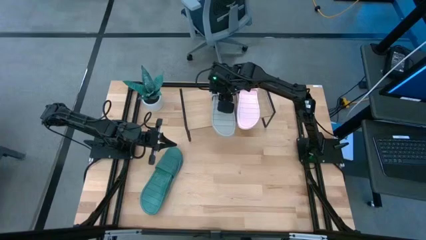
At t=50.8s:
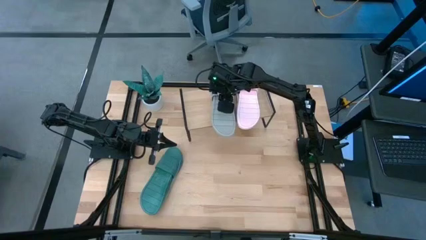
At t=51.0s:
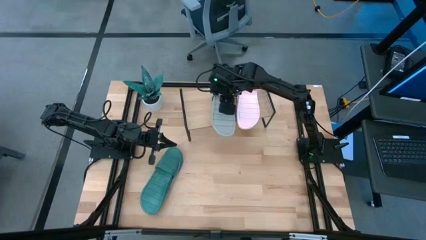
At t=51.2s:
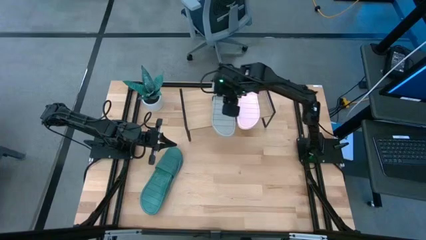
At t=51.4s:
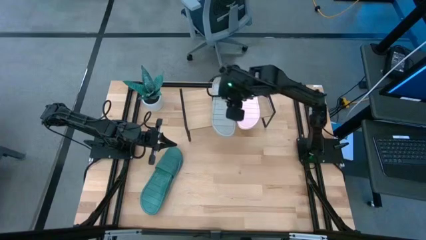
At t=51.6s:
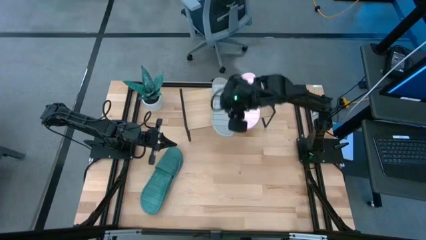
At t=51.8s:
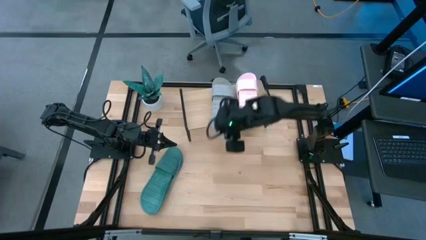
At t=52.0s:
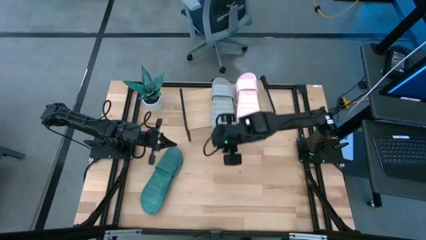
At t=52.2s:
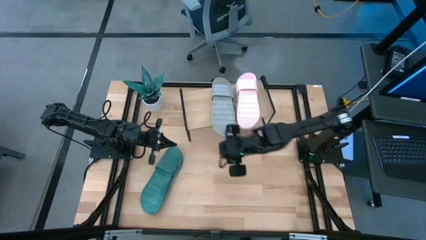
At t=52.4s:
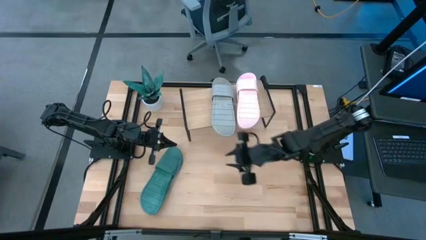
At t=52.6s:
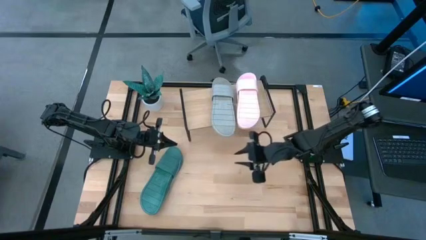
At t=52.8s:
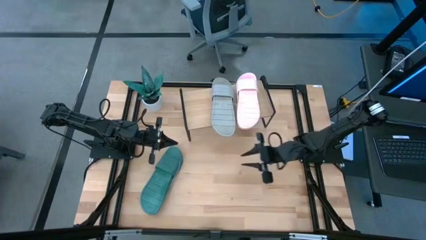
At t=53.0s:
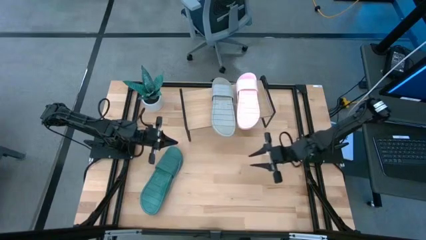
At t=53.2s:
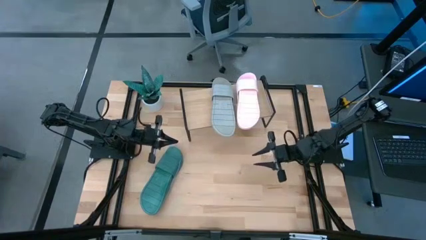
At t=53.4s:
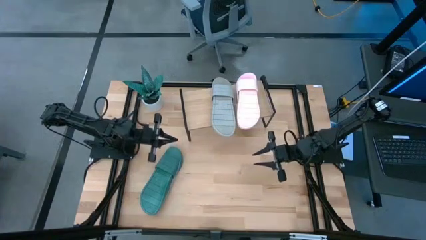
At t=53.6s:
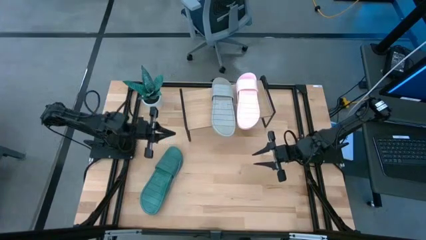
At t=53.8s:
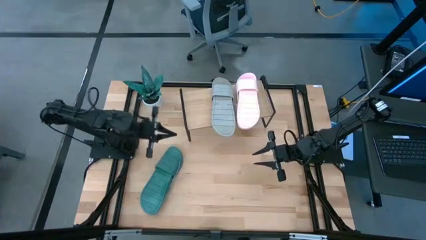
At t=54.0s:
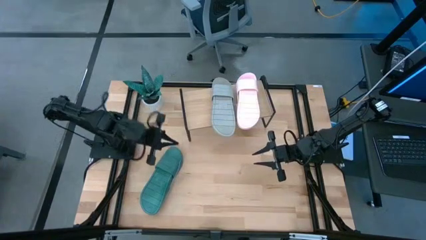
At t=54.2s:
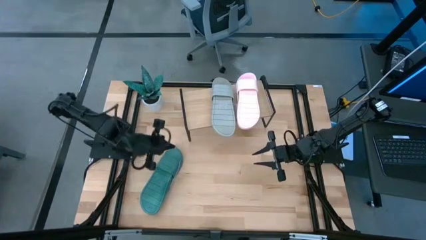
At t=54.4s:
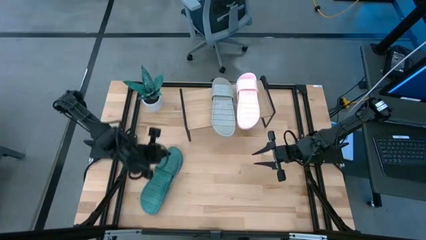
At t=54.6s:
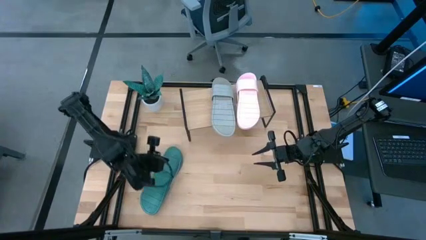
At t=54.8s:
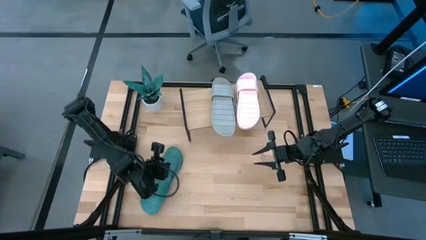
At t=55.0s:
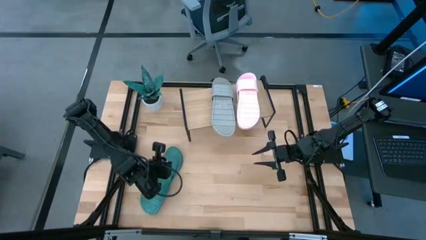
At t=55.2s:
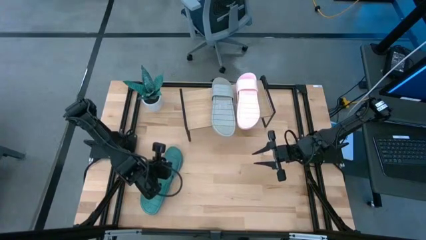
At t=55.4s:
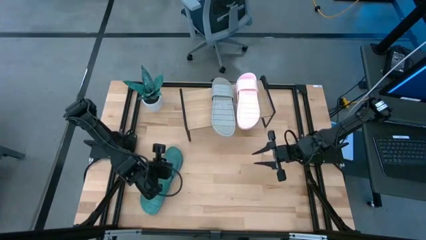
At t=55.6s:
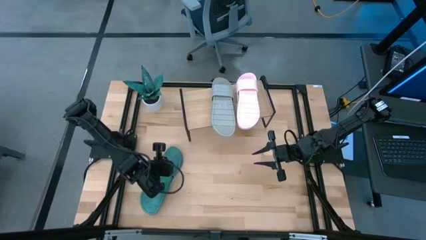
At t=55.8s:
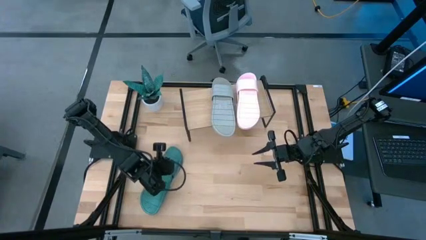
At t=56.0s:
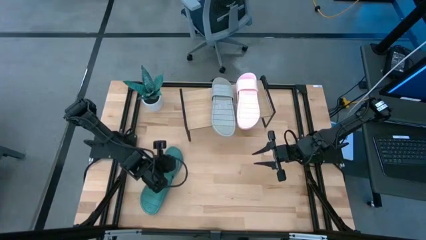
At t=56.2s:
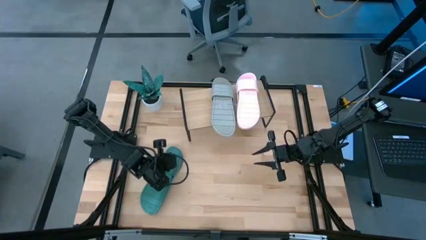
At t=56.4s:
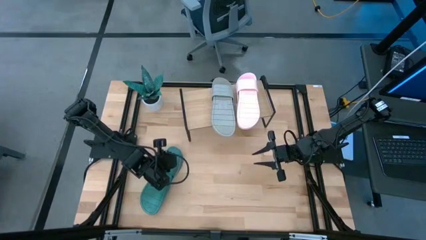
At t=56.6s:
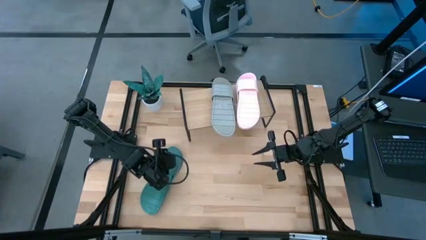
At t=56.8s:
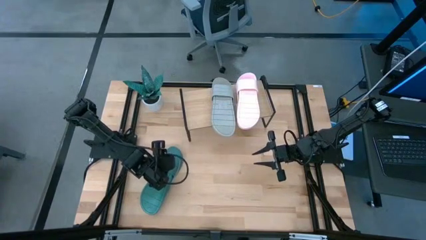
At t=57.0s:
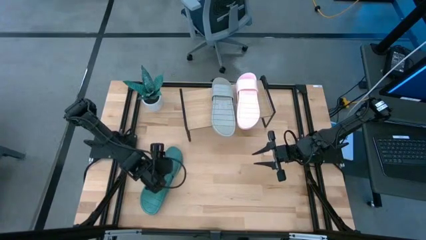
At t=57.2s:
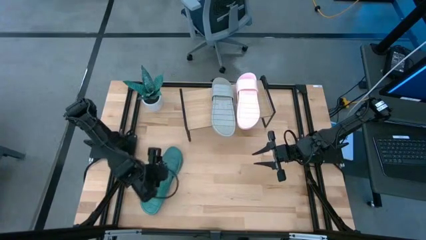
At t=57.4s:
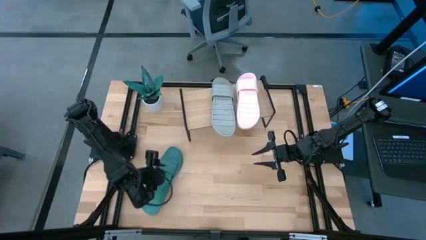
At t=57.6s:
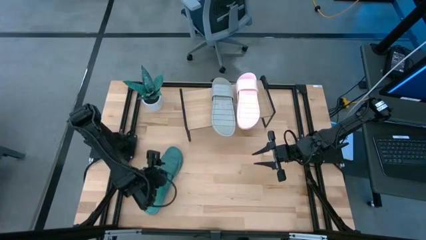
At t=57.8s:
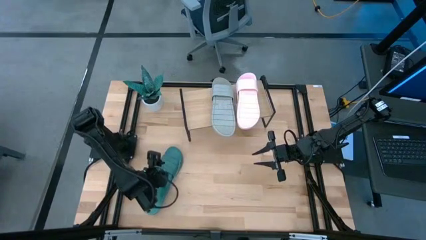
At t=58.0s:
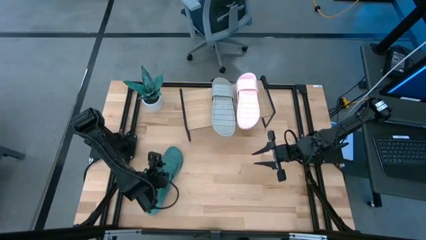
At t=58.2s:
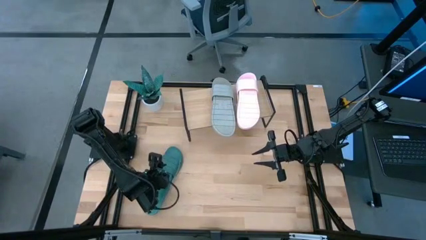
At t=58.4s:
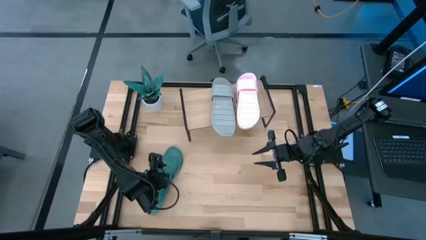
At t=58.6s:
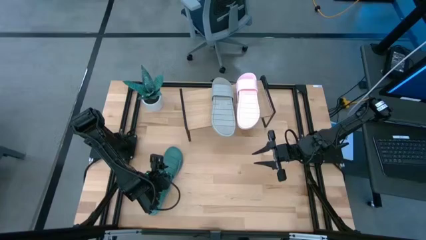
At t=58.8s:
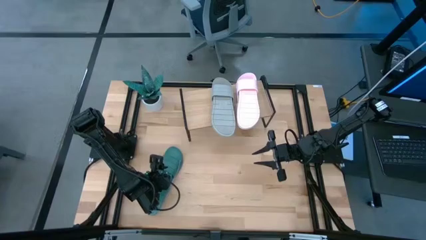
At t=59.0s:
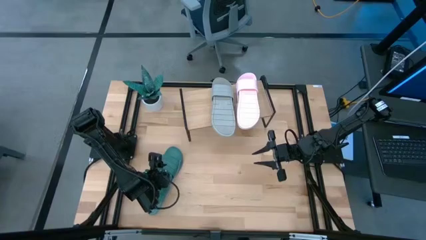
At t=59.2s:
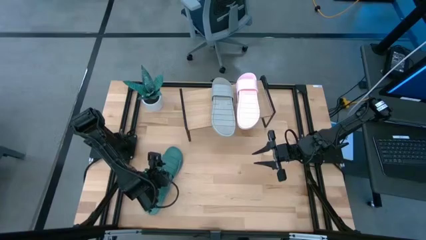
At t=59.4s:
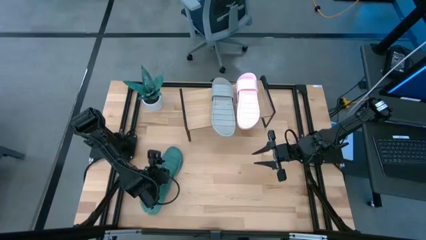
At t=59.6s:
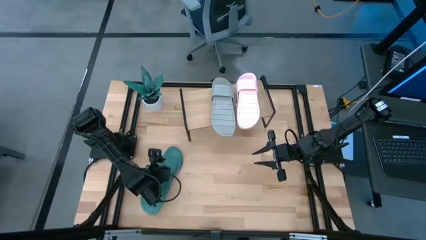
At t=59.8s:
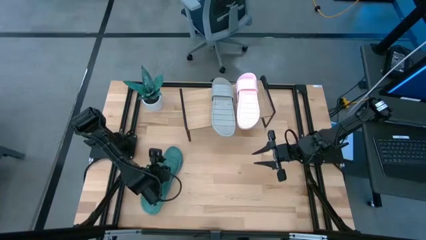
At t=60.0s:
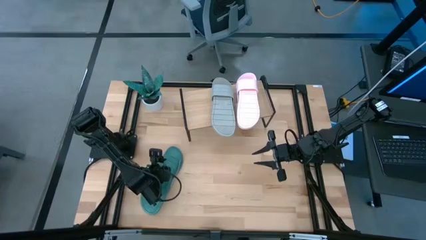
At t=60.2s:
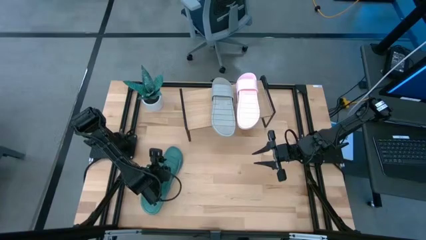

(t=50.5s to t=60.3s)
Task: Pick and place slides into the shelf
Put the green pair of slides on the shelf

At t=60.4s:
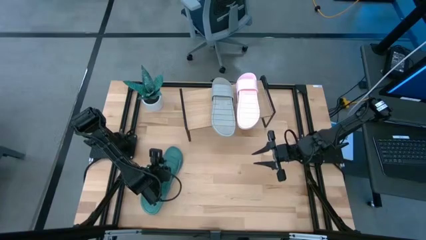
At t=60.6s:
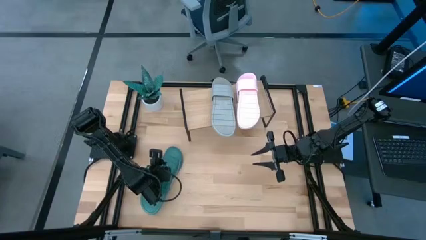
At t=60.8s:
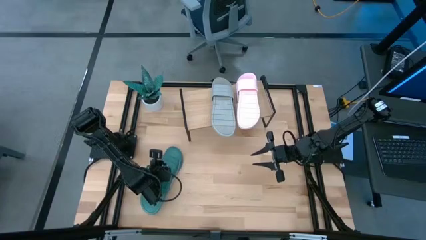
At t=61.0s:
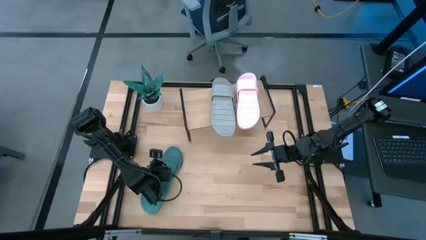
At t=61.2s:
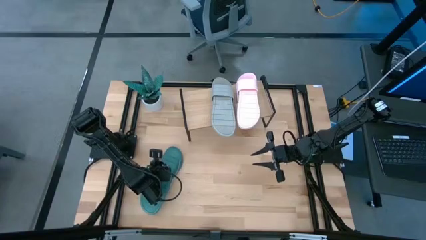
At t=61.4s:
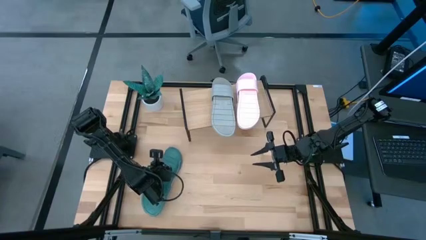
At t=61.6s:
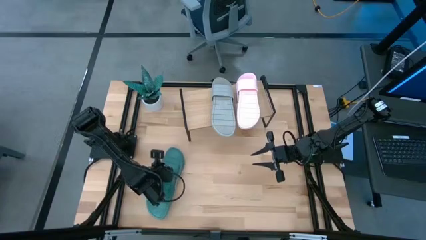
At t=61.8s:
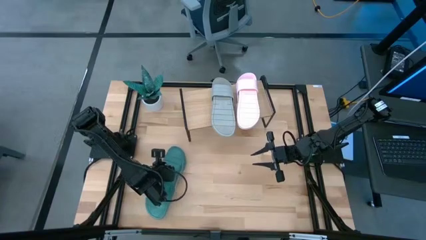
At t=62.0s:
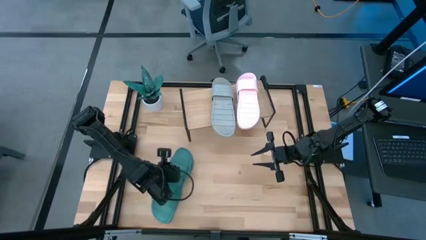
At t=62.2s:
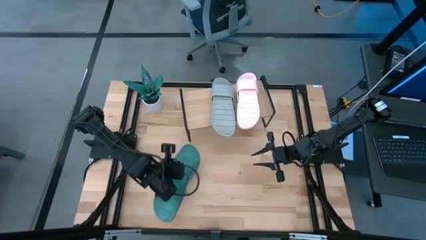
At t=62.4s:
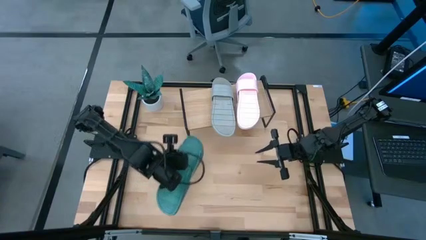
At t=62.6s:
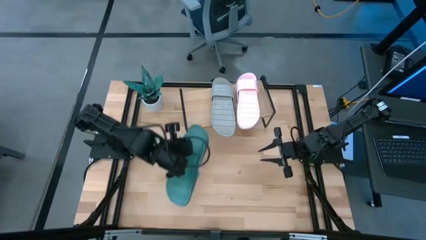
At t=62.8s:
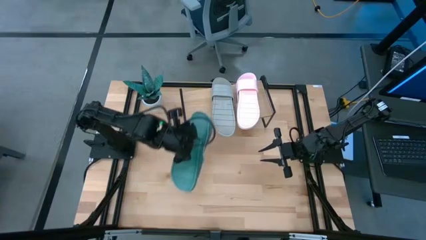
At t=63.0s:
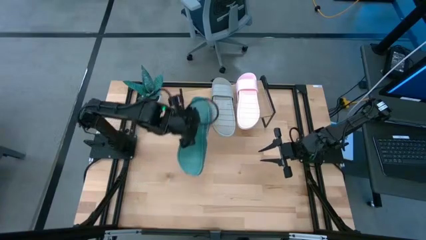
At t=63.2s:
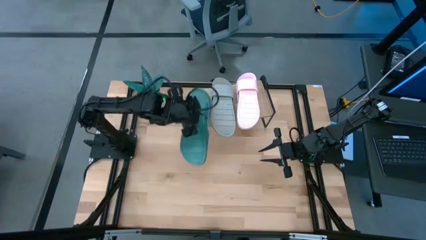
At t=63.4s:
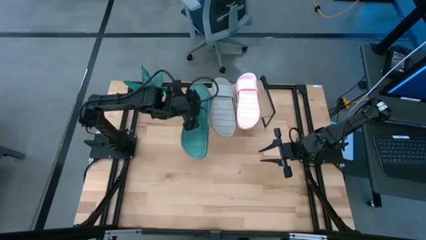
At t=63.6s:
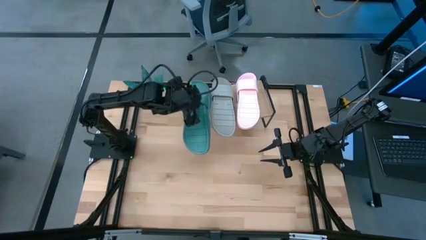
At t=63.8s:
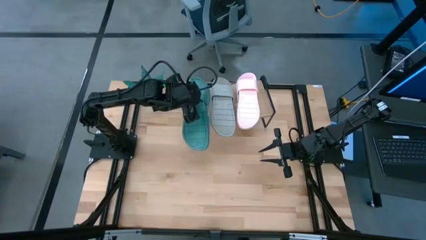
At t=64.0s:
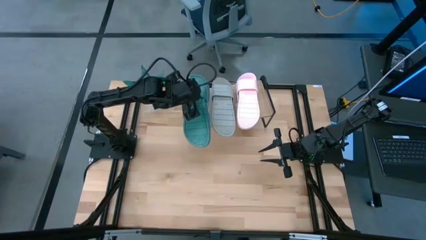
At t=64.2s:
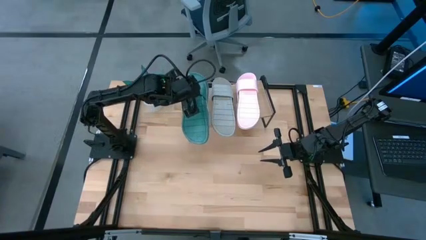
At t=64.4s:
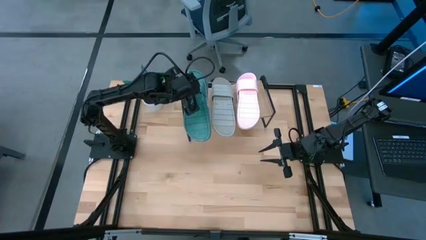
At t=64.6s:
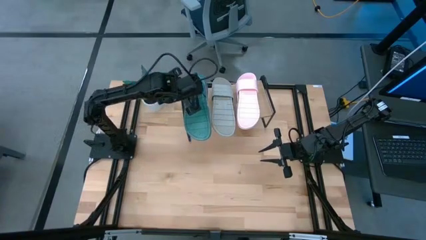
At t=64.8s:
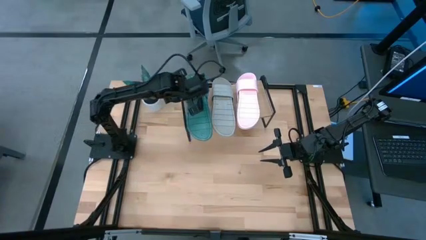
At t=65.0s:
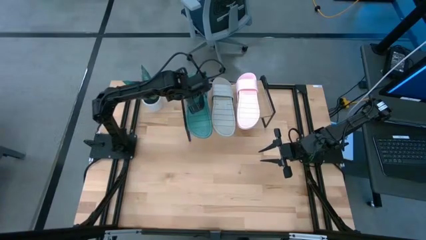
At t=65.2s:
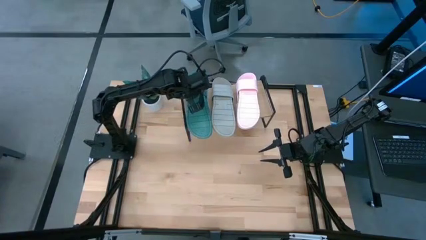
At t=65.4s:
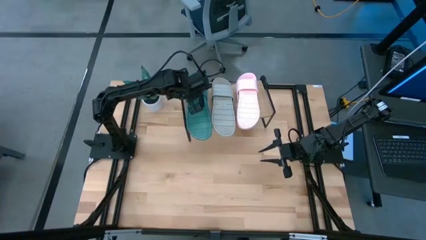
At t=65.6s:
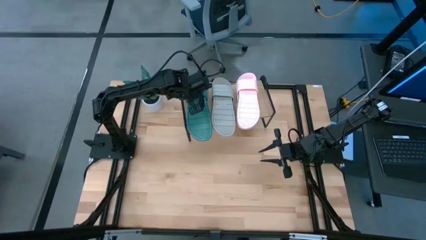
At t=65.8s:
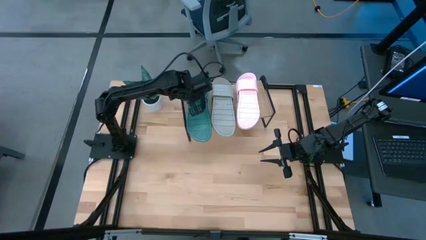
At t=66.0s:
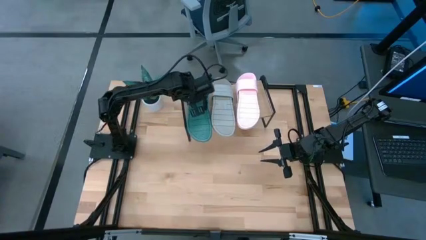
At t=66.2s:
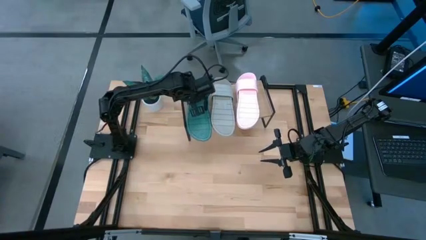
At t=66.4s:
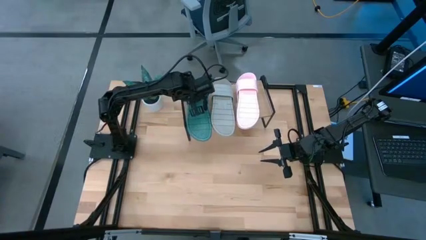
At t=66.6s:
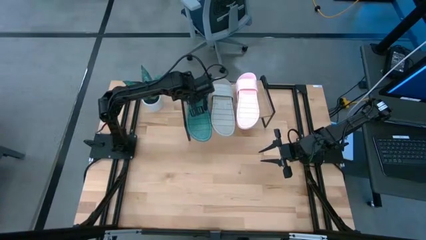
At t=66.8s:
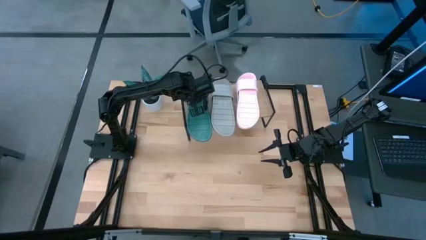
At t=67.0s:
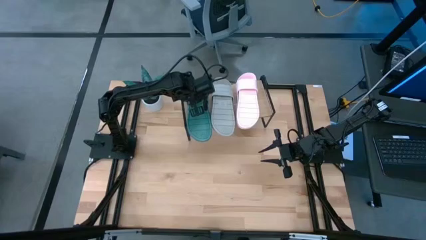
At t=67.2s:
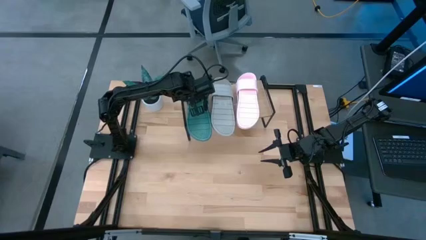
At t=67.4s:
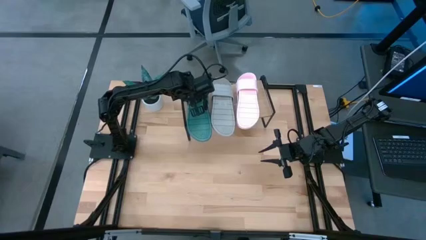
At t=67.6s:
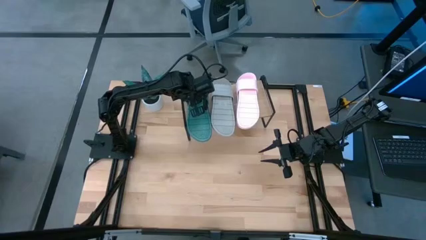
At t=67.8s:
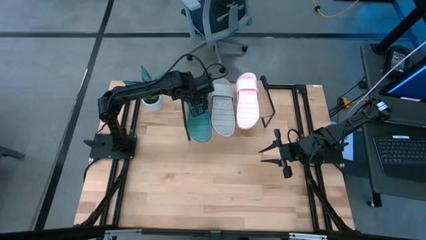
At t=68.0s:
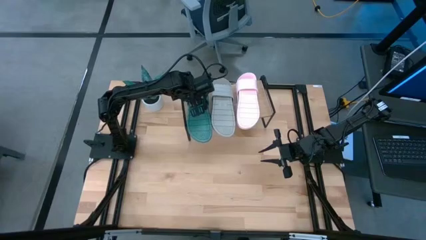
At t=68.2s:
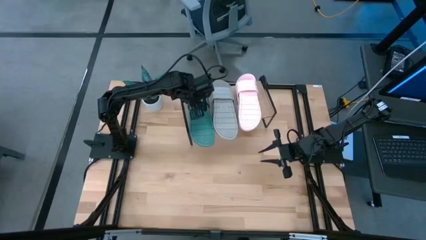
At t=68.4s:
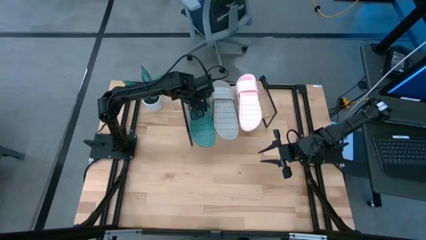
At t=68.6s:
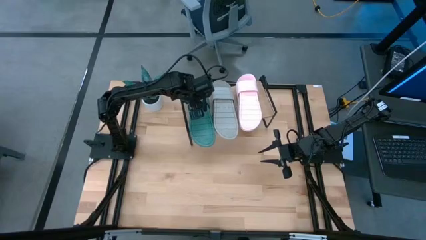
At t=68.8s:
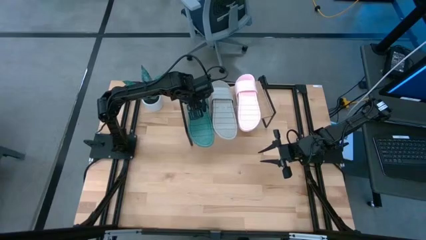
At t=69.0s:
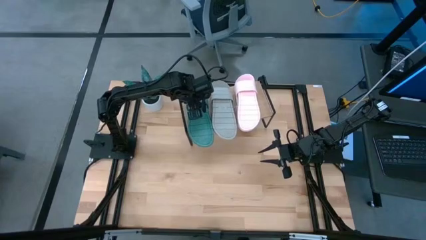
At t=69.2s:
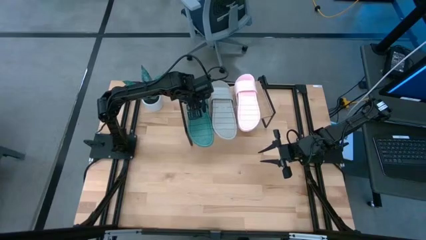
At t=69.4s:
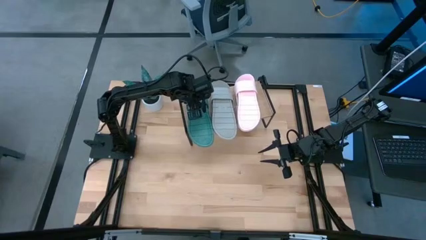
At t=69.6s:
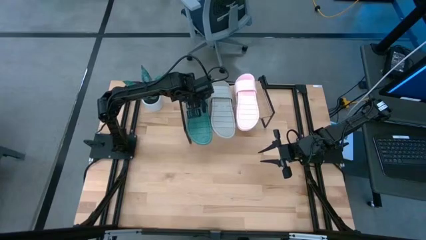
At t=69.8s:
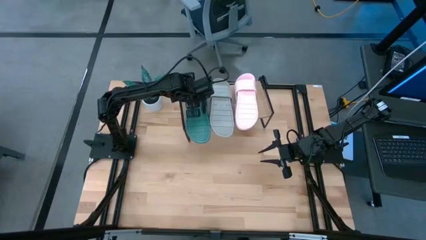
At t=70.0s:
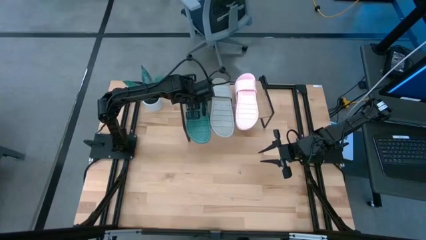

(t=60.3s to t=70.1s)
Put the green pair of slides on the shelf
